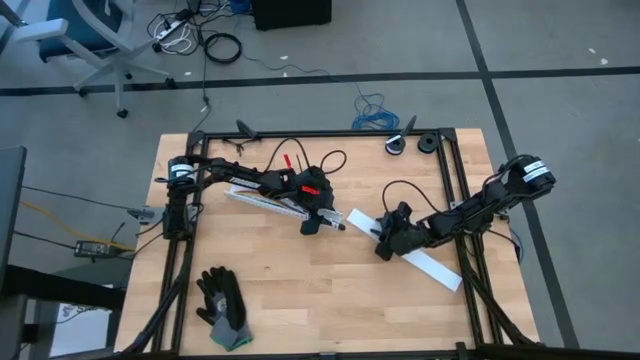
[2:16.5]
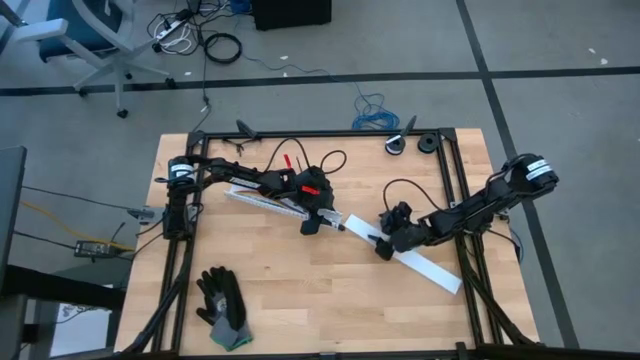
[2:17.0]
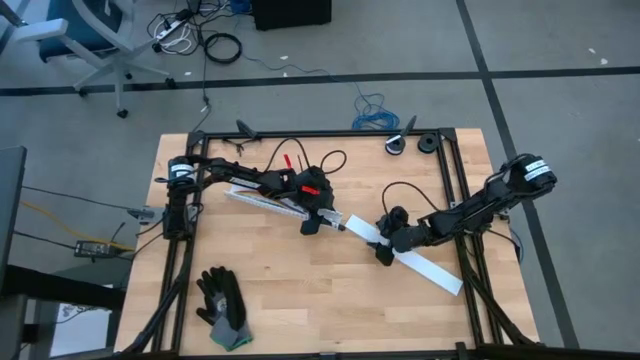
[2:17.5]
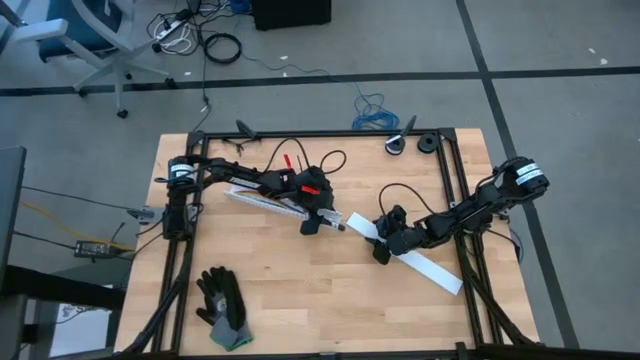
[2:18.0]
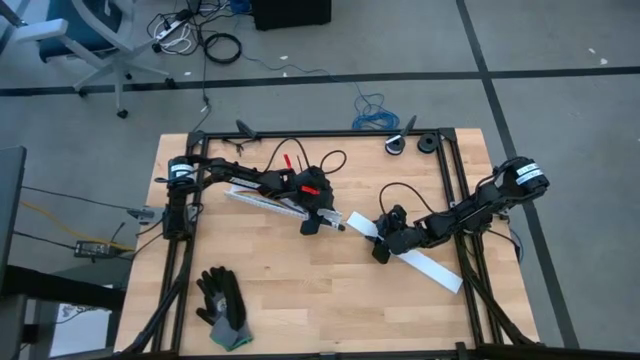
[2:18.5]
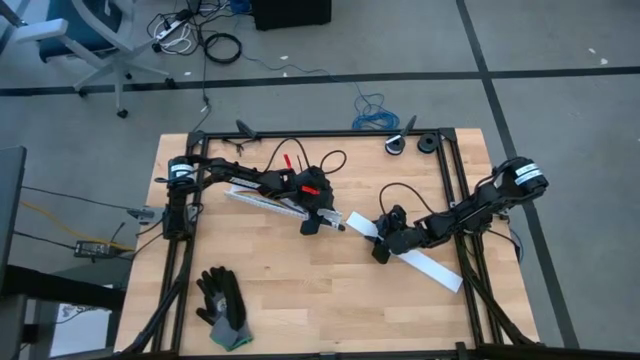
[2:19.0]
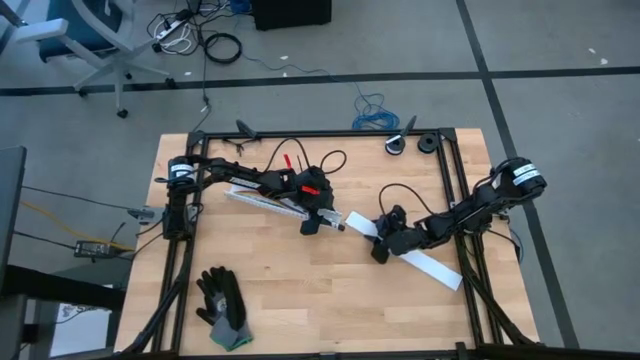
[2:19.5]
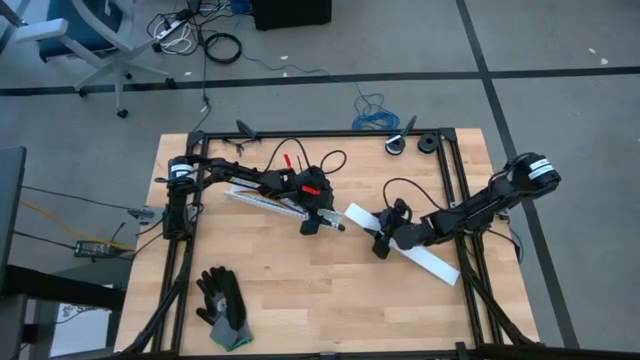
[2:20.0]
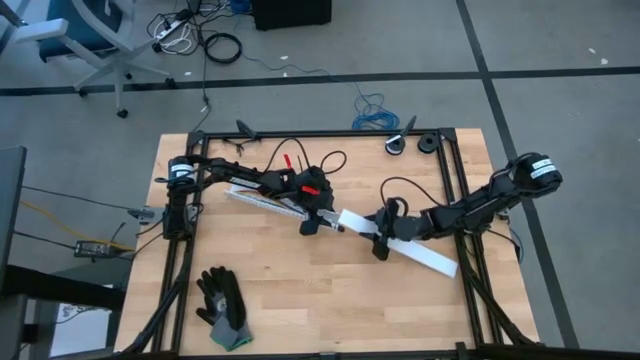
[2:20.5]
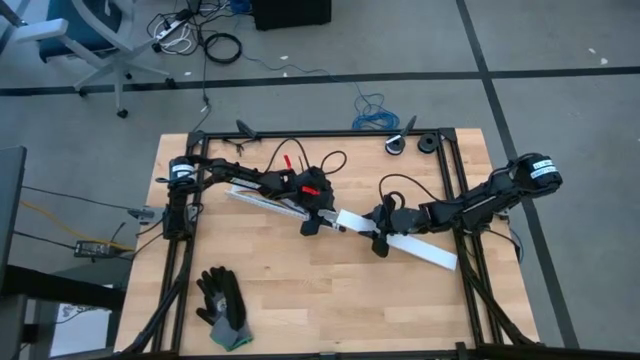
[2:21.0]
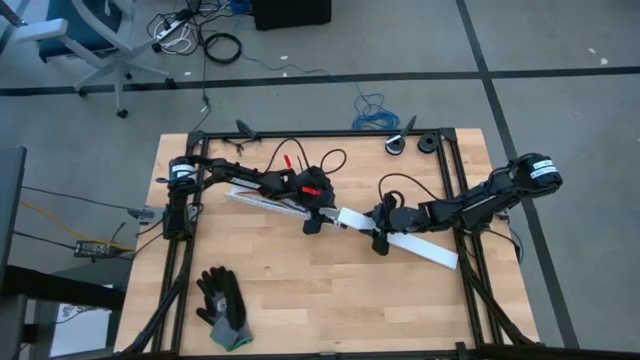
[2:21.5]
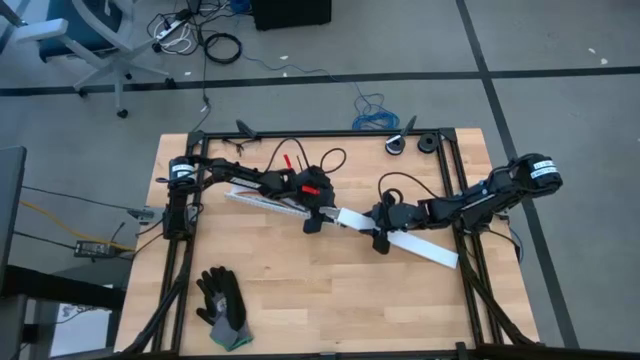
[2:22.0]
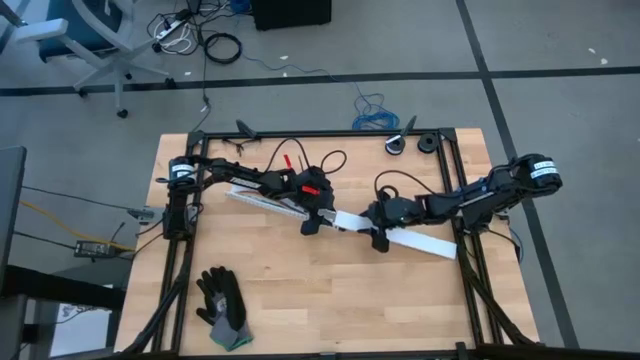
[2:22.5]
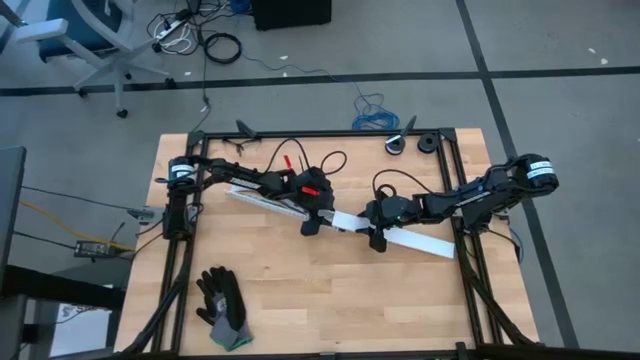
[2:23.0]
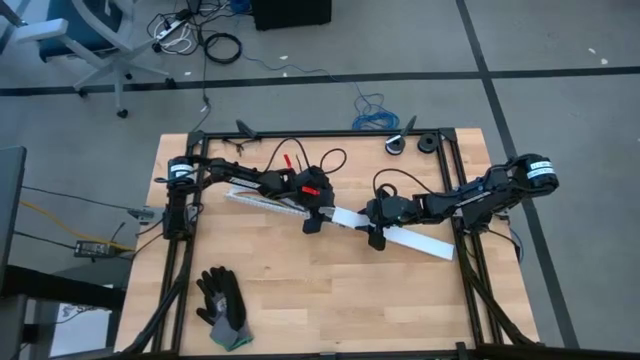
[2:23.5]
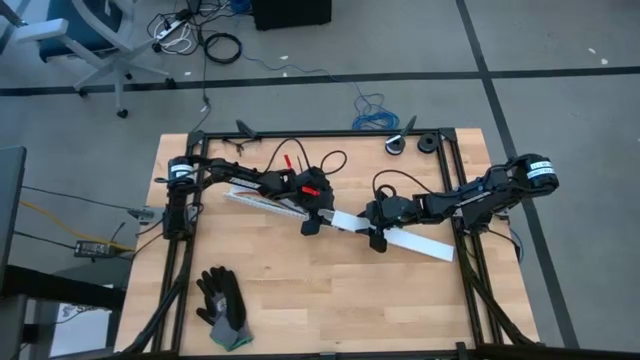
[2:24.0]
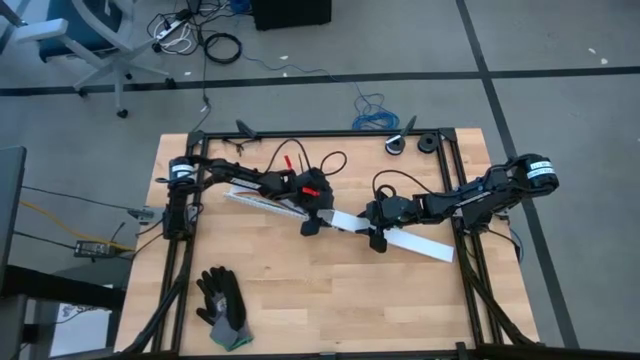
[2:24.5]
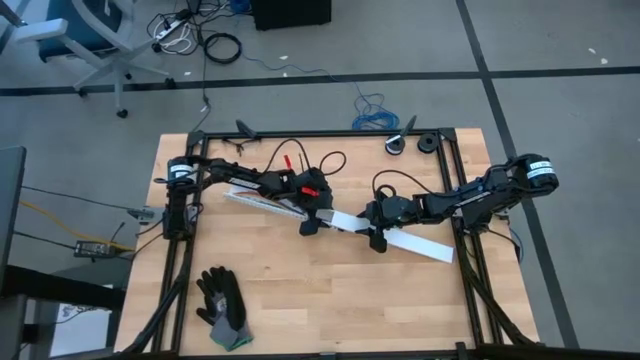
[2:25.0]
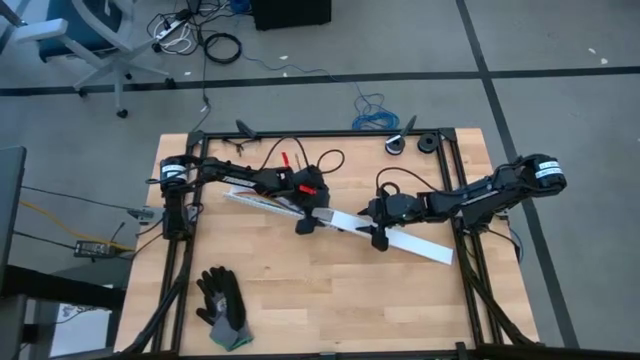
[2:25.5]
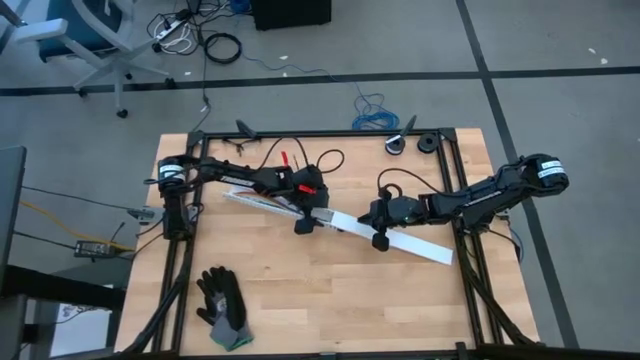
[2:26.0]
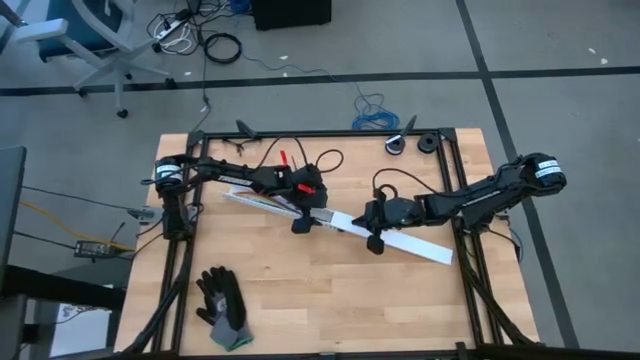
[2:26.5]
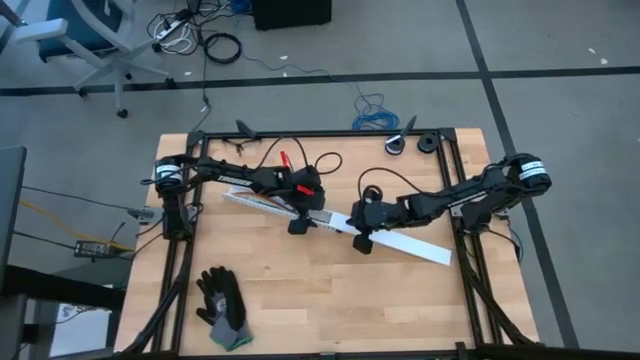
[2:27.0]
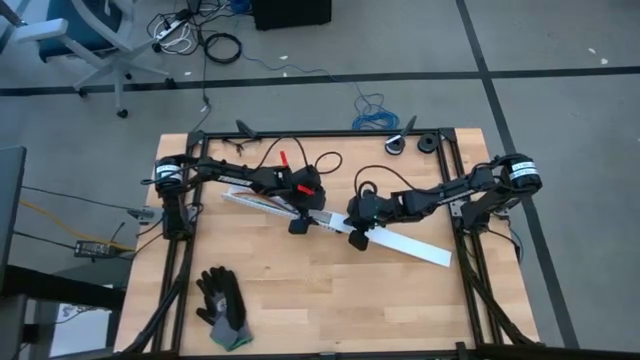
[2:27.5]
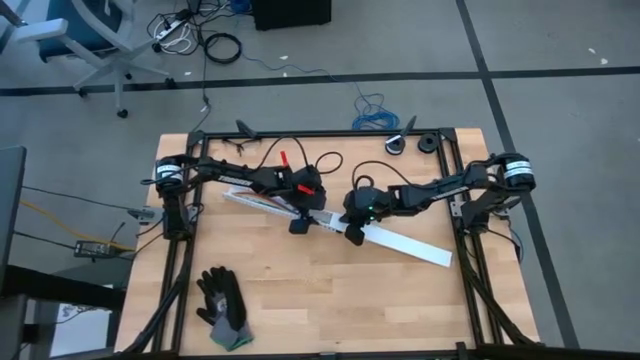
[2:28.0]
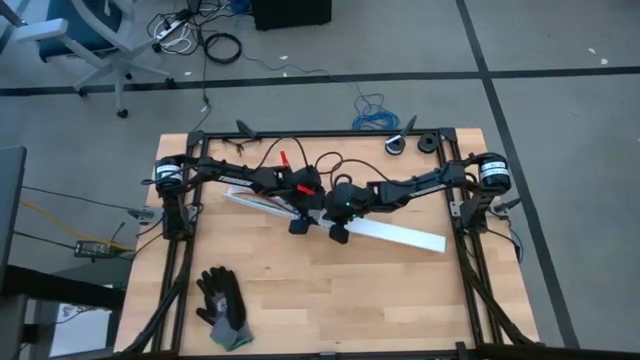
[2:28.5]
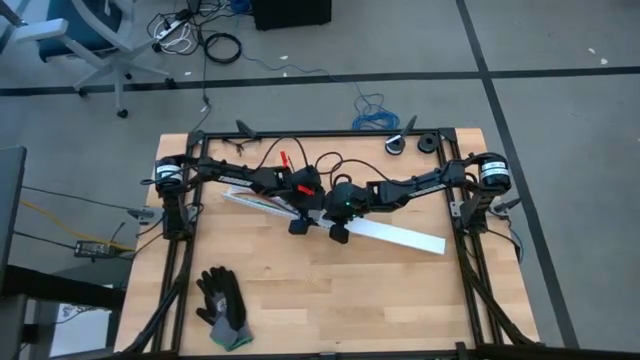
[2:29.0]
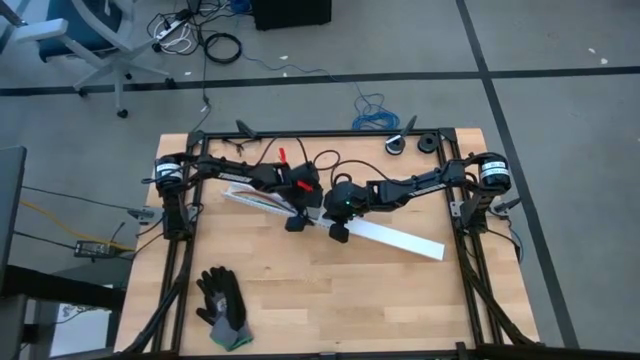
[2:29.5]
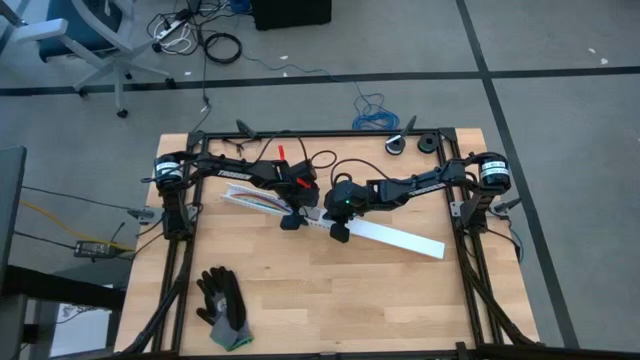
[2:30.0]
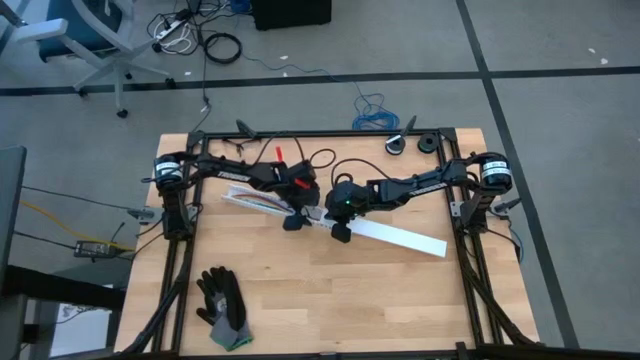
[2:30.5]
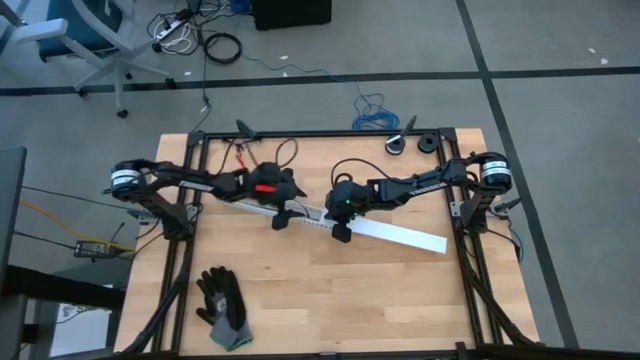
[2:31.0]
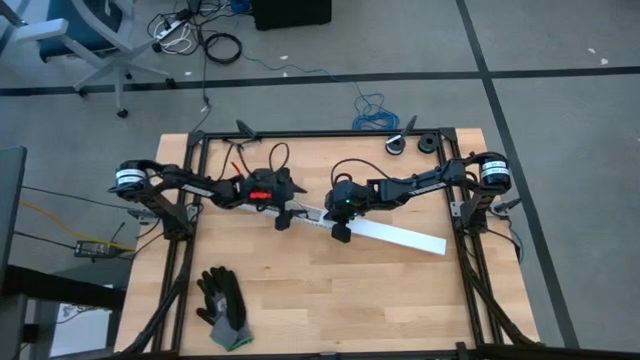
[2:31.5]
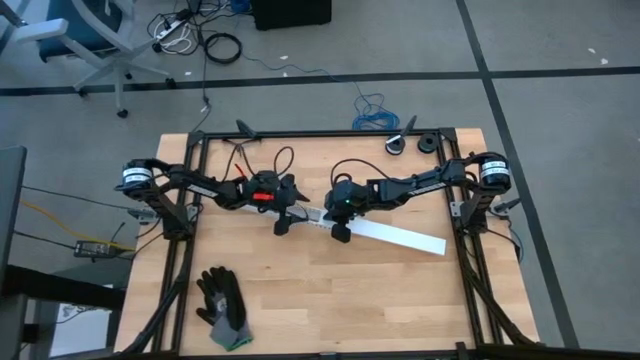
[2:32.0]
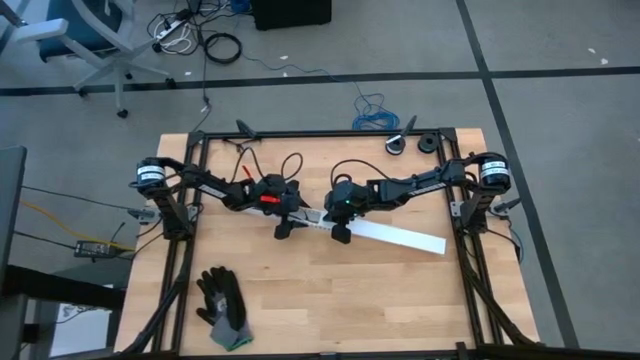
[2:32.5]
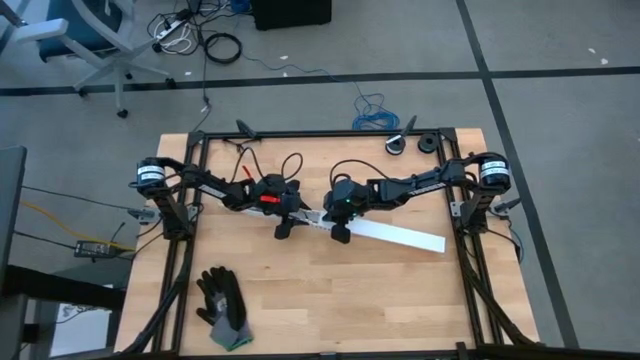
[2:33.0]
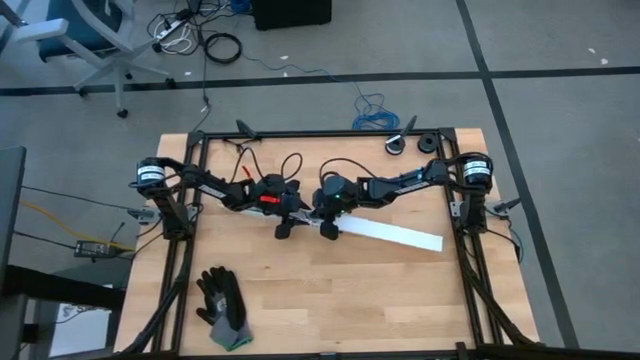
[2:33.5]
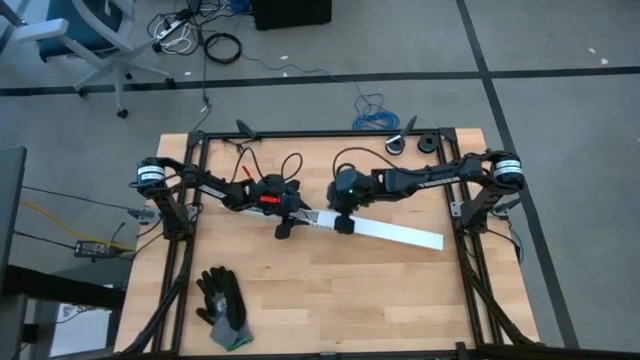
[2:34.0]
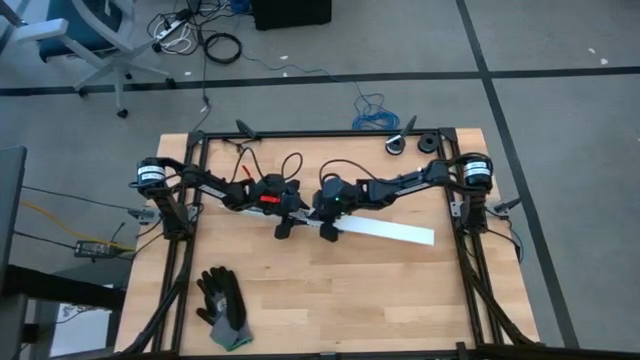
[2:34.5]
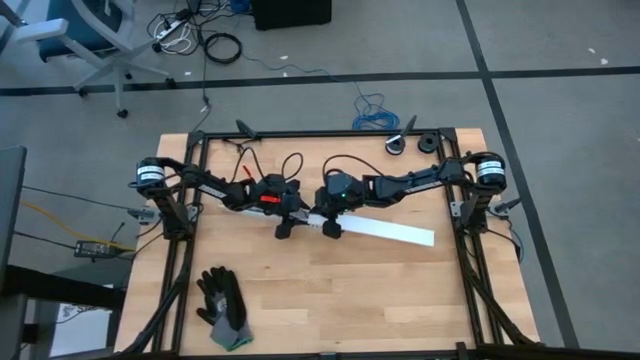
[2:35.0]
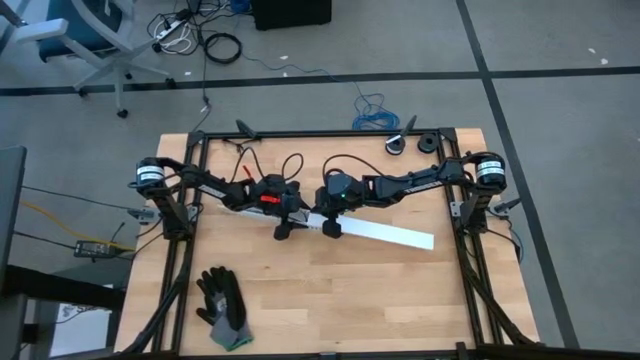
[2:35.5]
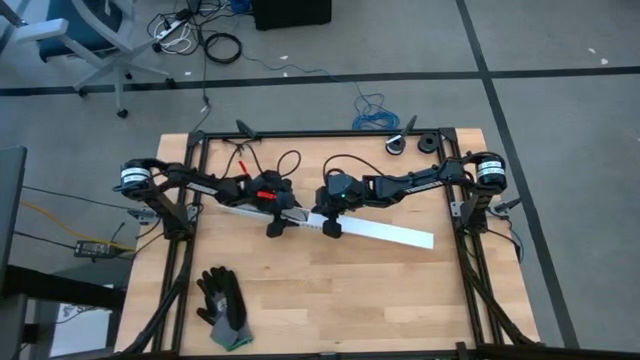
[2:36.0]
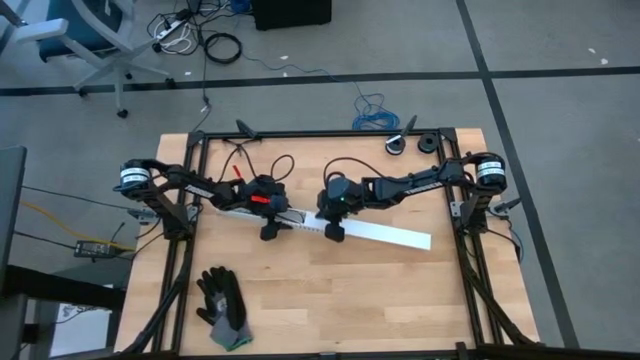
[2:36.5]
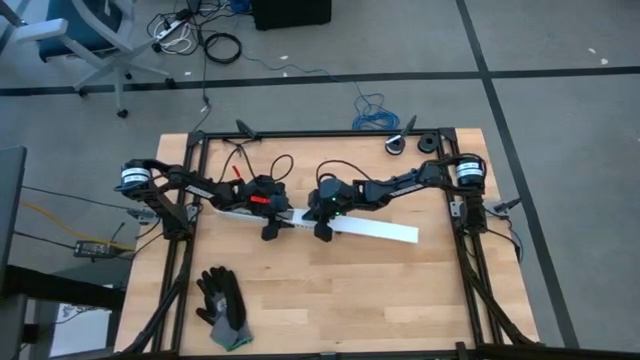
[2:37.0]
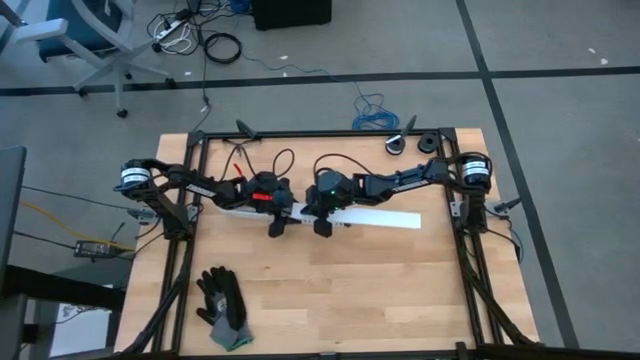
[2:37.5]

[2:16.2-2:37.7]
Task: Ziptie cables
Close the white cable duct with the cover

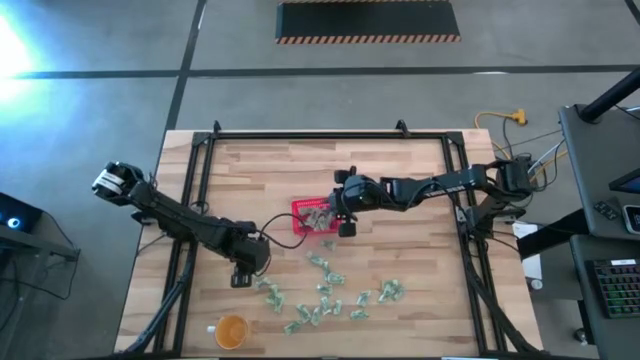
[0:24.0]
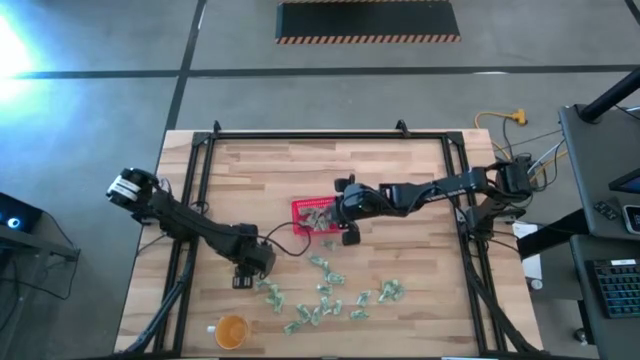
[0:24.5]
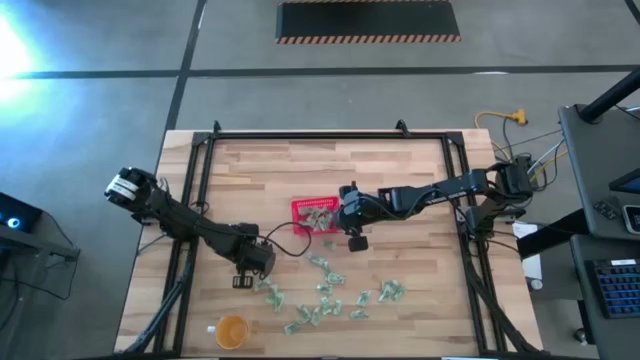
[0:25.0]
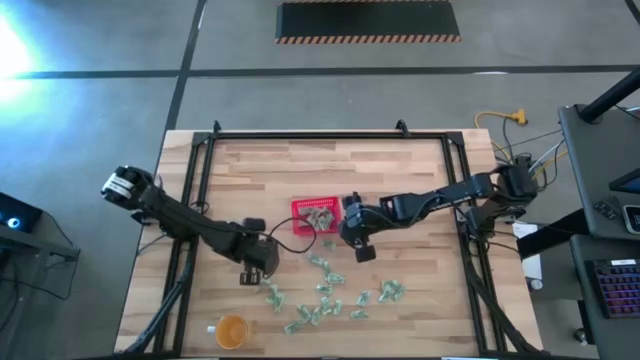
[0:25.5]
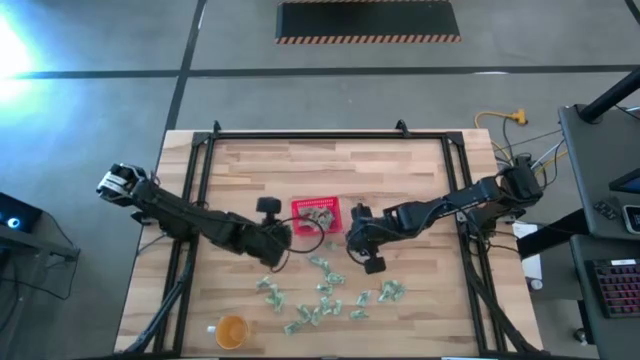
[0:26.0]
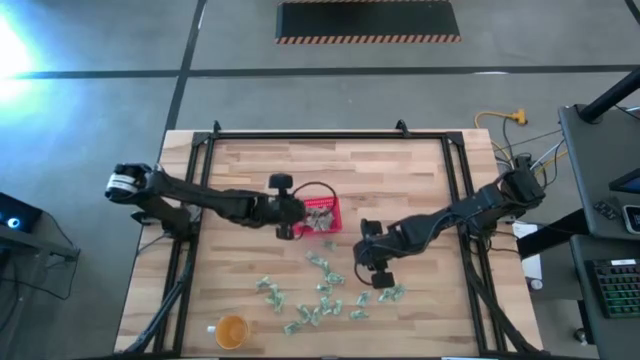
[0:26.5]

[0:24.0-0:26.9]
Task: Pick and place items into bin
Put the stevia packet into the red bin
